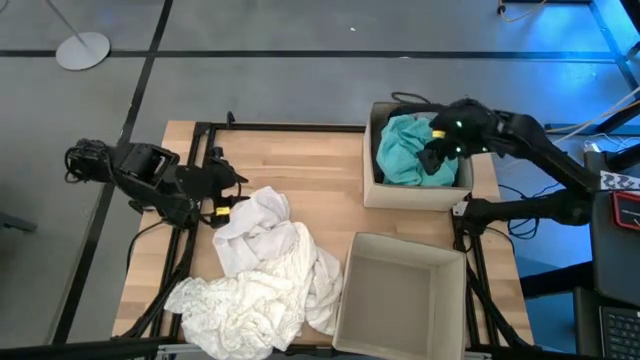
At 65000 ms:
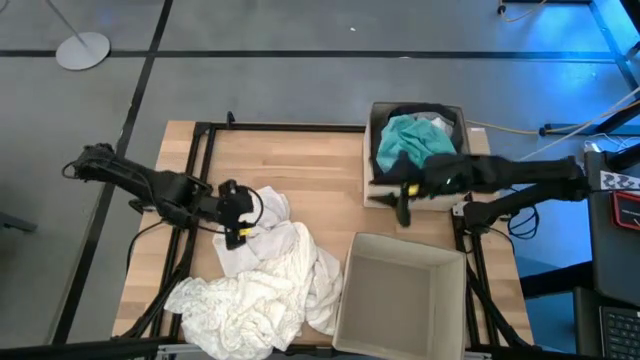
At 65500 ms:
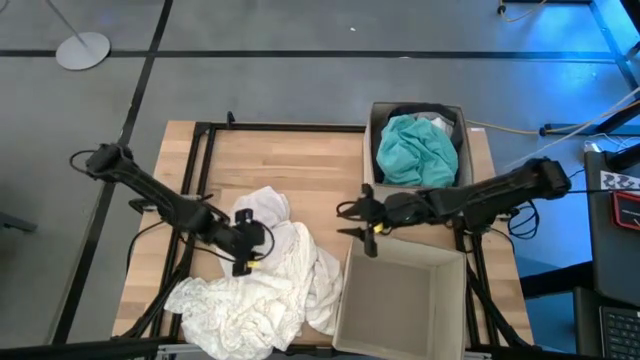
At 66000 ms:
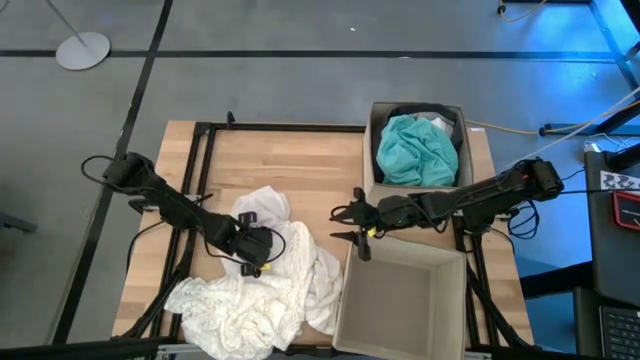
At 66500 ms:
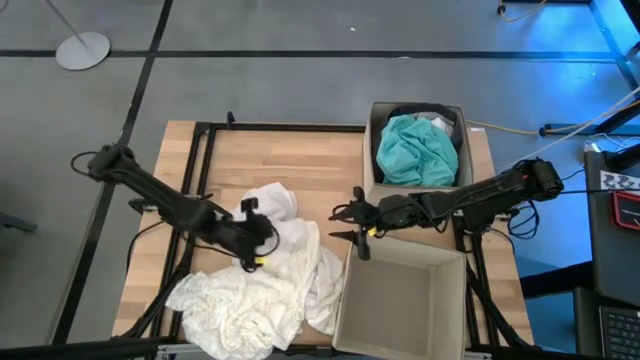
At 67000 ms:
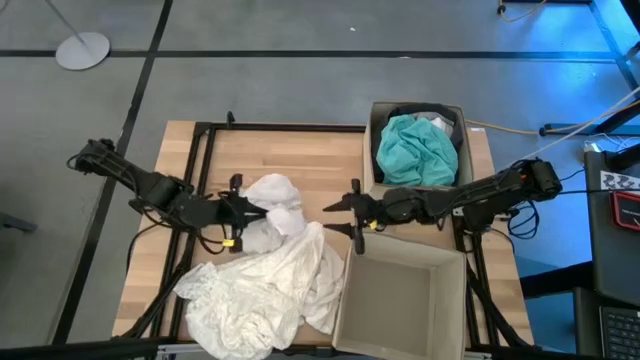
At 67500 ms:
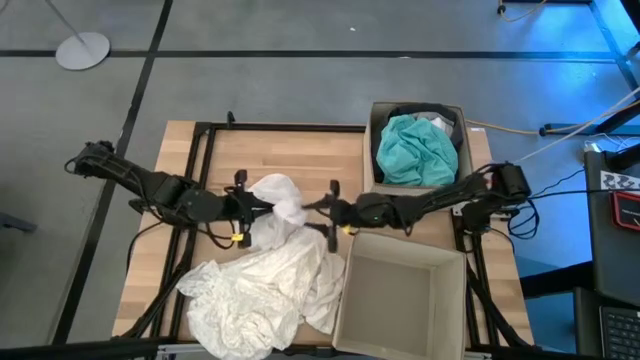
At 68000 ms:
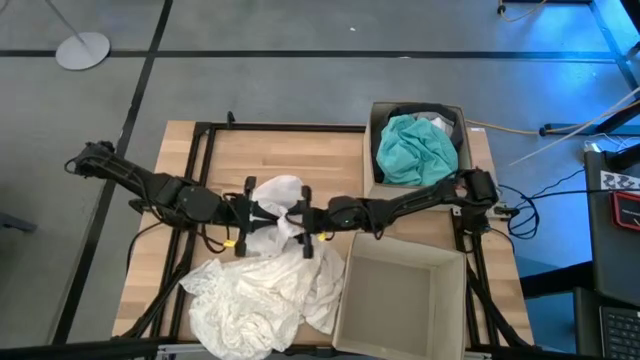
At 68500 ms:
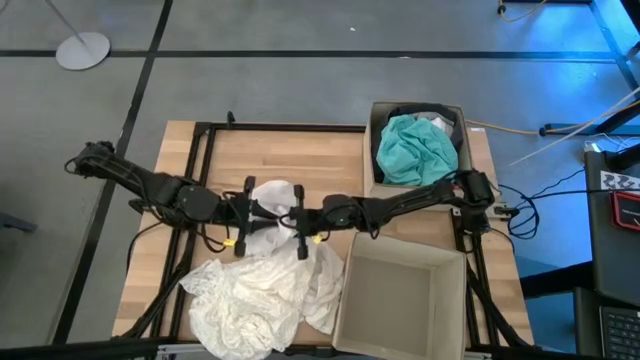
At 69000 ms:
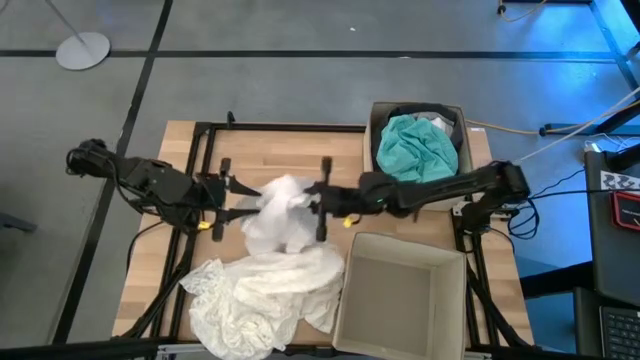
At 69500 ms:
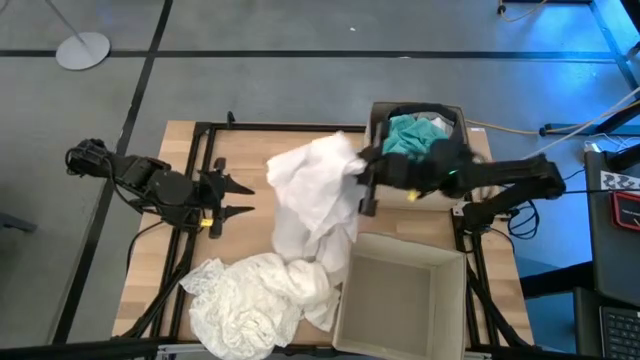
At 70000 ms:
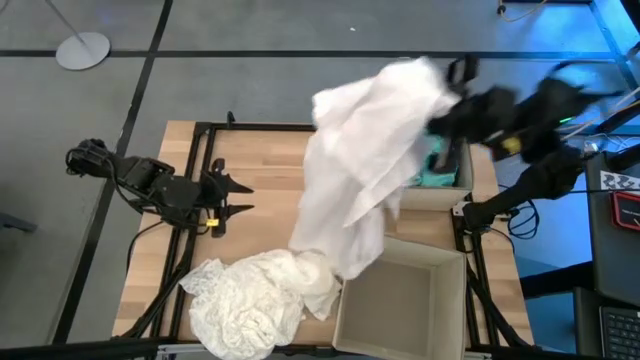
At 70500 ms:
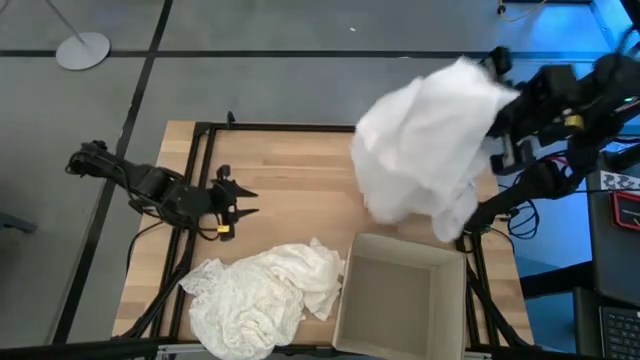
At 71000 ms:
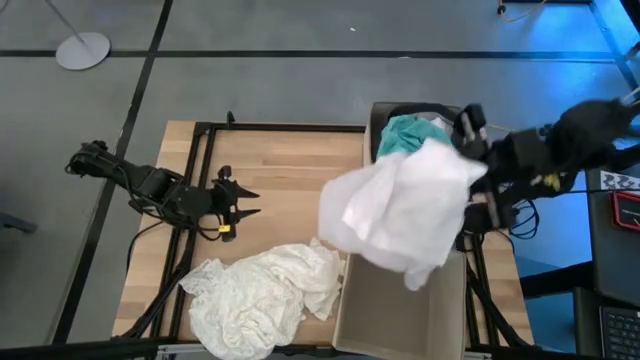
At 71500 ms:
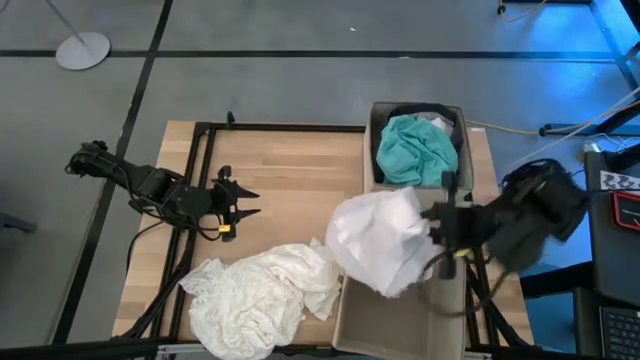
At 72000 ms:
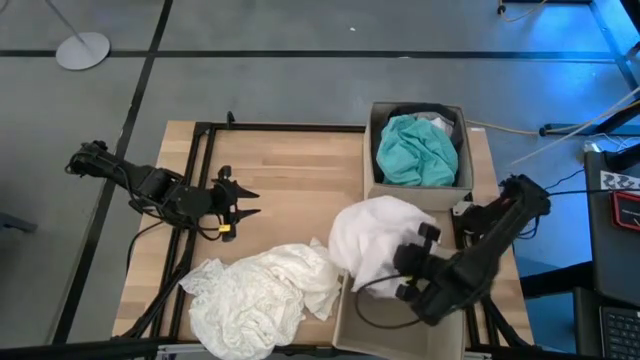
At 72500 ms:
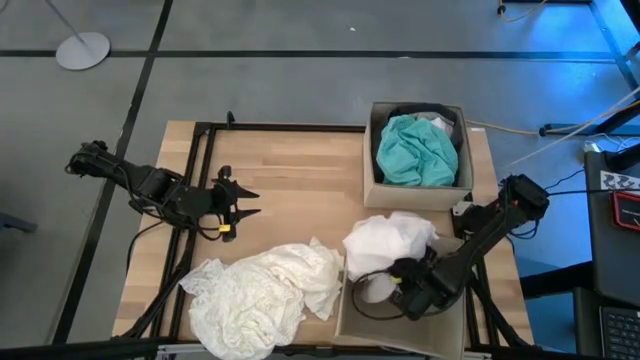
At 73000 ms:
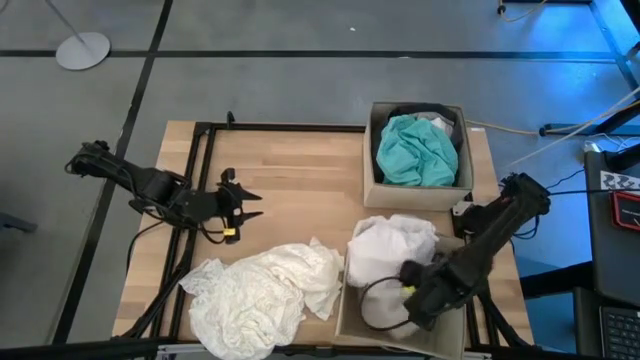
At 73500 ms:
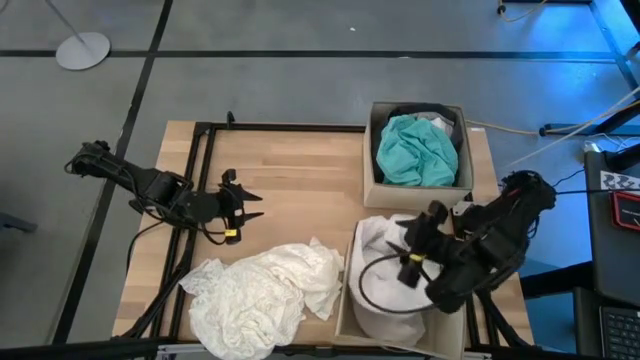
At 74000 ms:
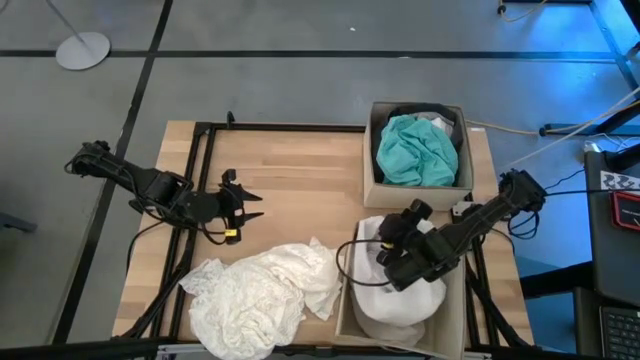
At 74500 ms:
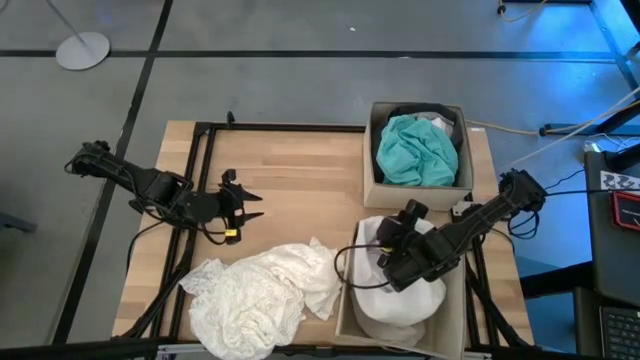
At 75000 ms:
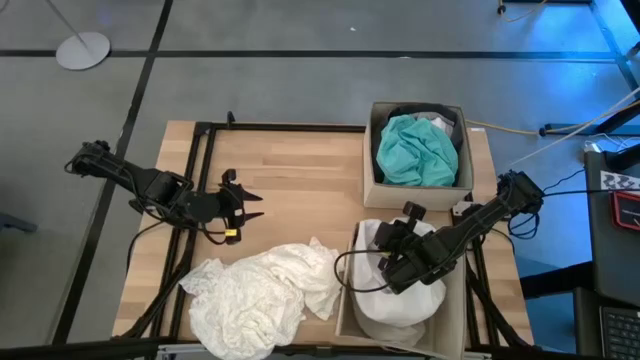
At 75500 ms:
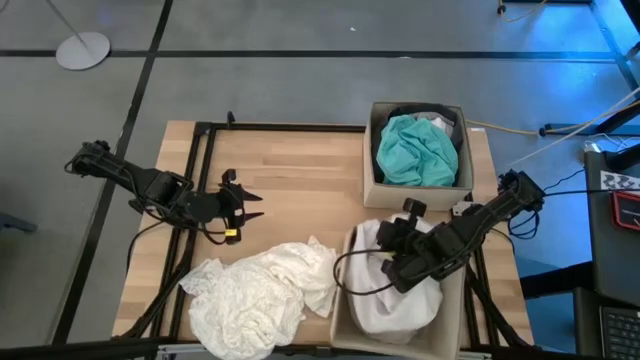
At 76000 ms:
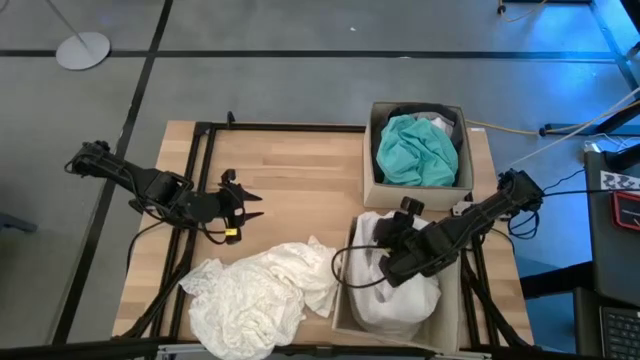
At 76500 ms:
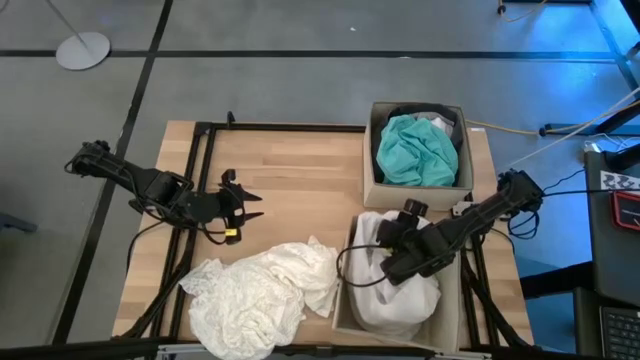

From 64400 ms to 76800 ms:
Task: Sort clothes
Put the white dress into the bottom laundry organizer

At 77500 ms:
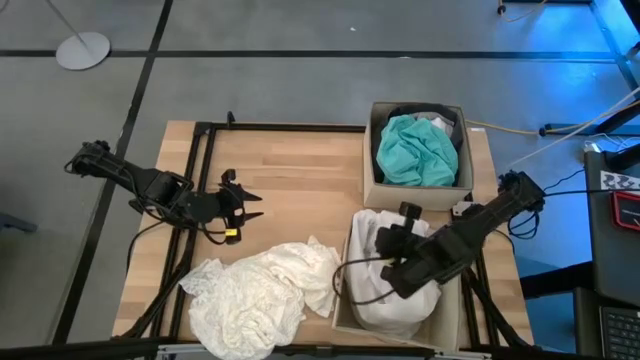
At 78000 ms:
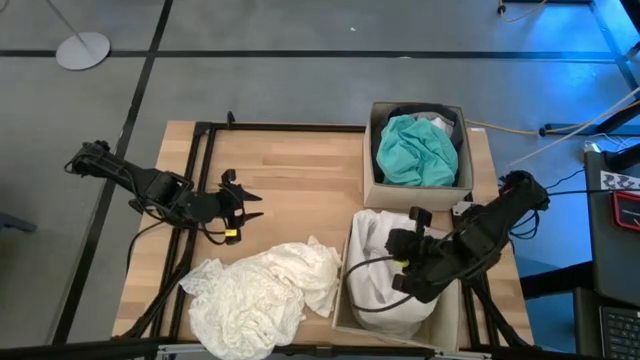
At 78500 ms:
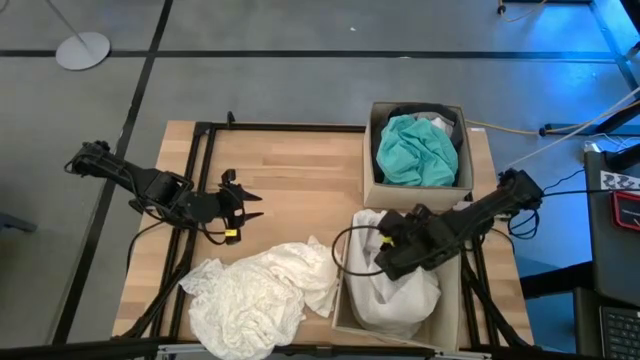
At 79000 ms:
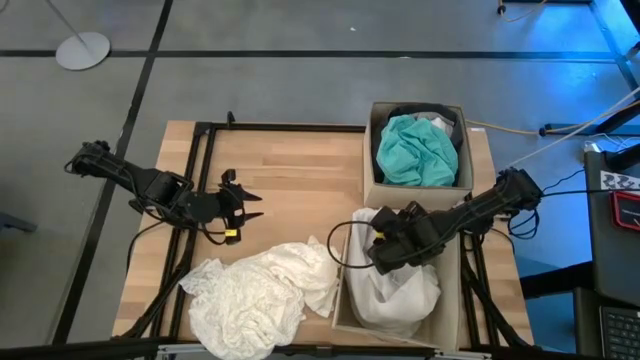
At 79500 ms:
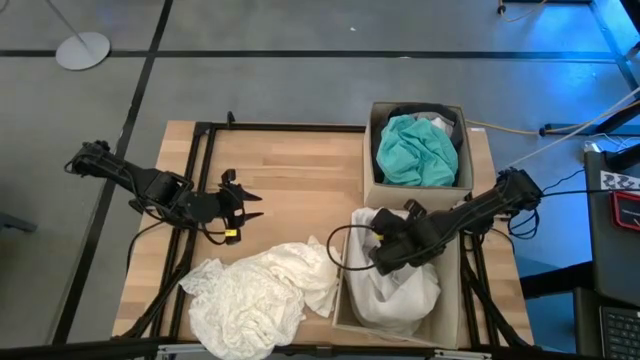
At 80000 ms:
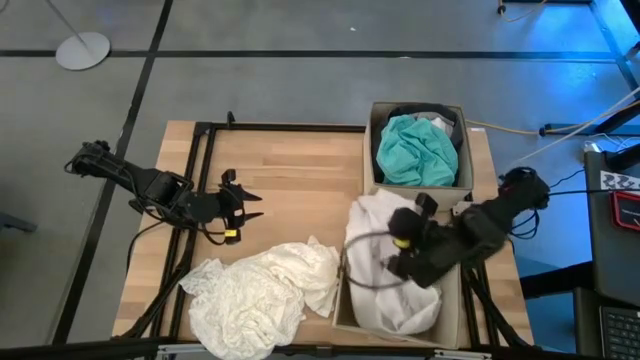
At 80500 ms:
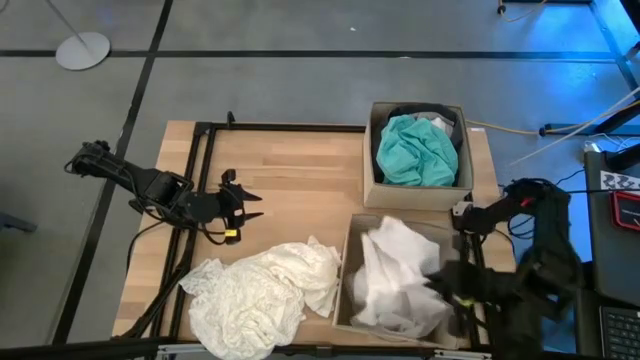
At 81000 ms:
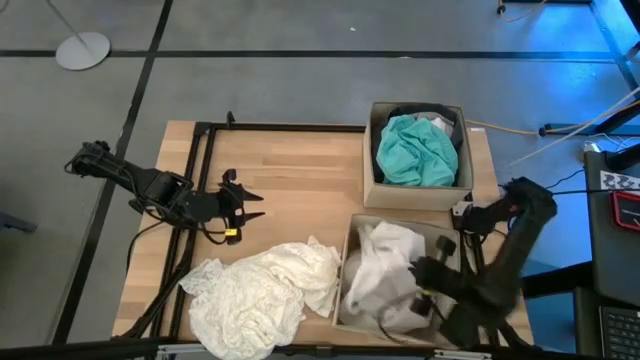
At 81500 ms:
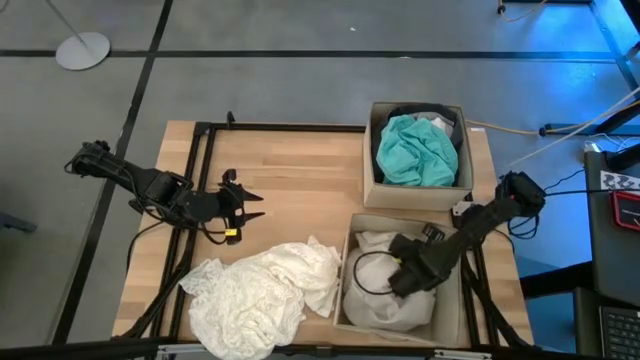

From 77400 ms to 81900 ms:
Put the white dress into the bottom laundry organizer
